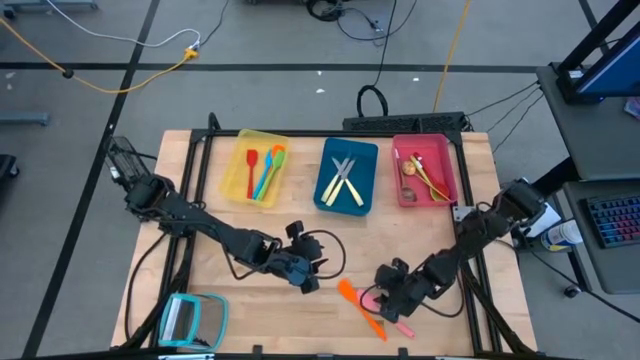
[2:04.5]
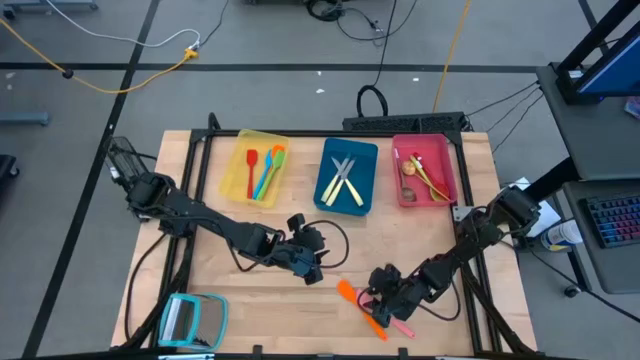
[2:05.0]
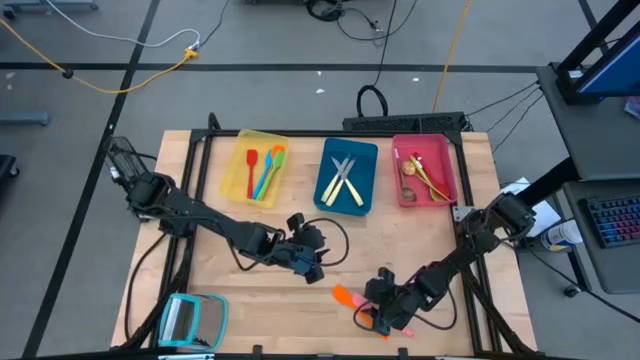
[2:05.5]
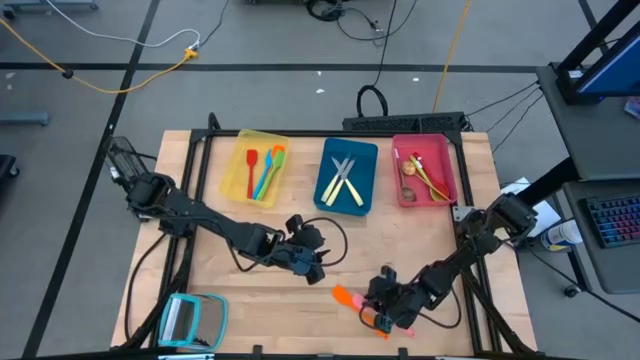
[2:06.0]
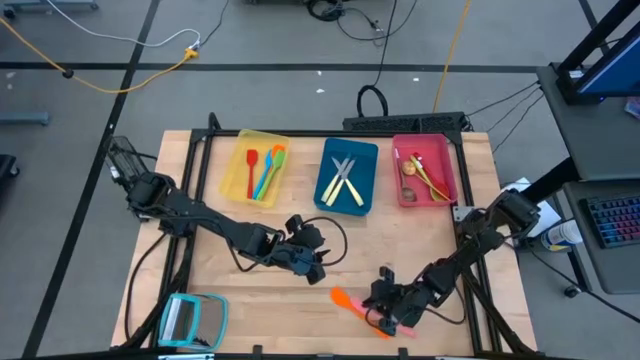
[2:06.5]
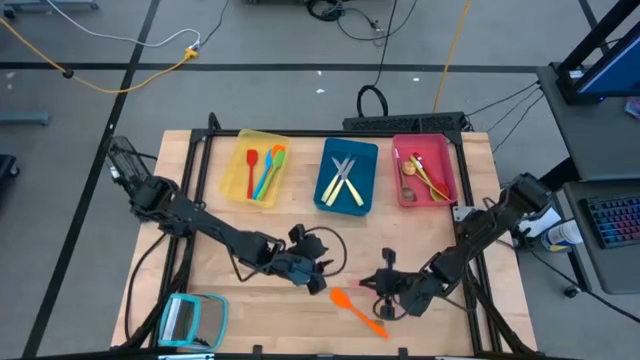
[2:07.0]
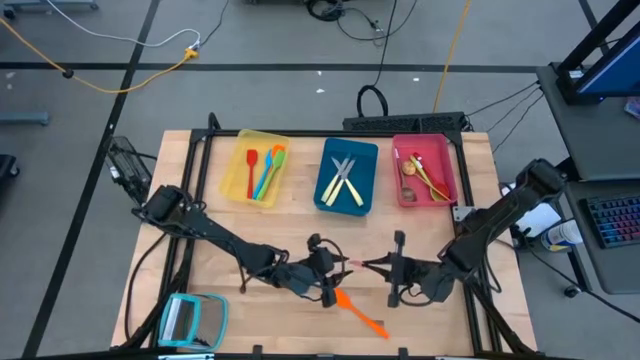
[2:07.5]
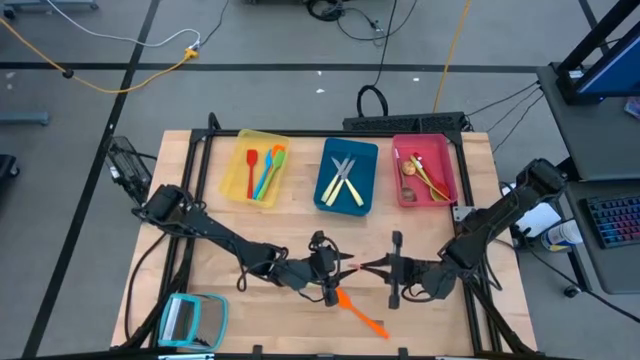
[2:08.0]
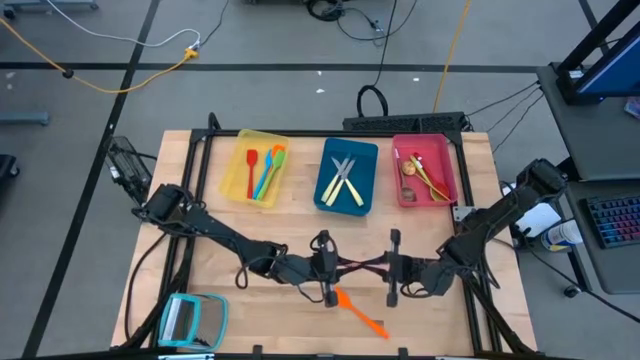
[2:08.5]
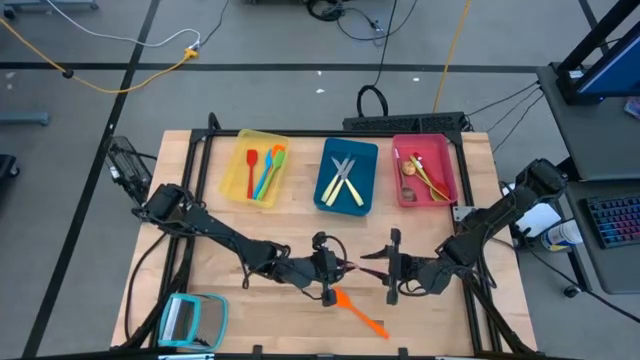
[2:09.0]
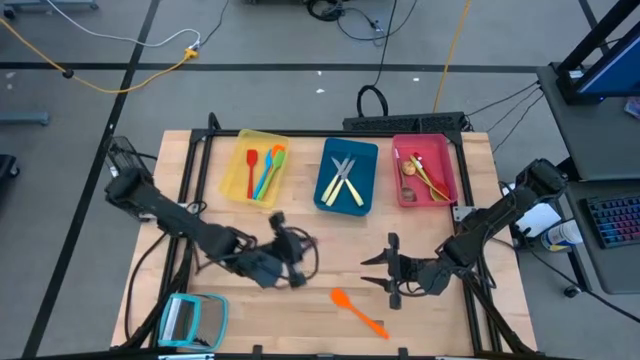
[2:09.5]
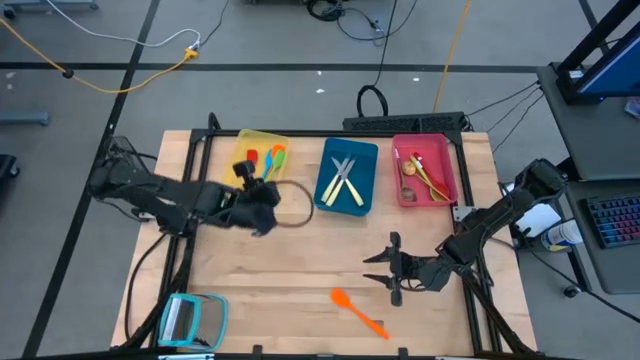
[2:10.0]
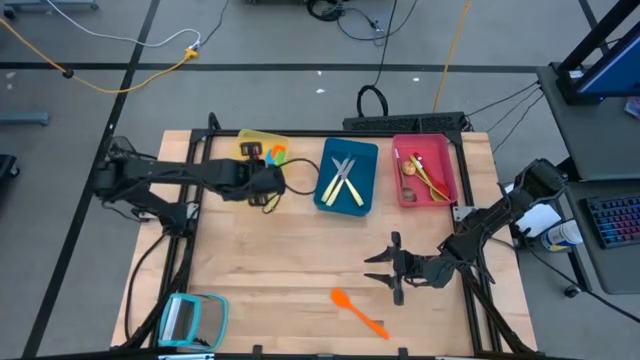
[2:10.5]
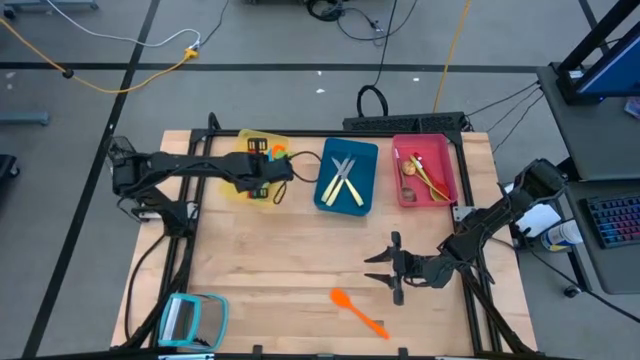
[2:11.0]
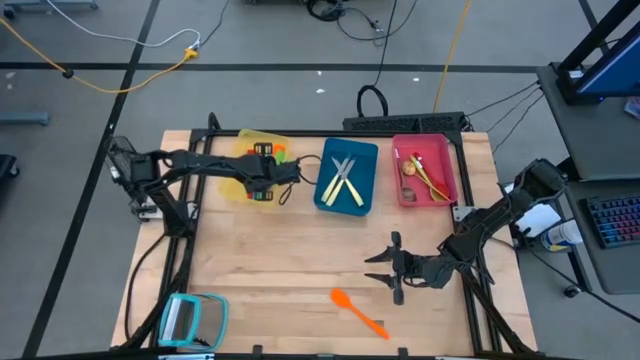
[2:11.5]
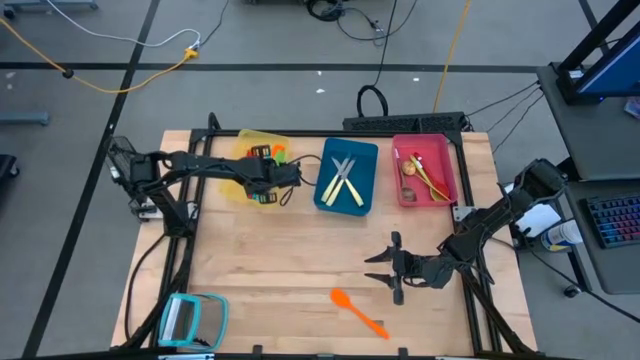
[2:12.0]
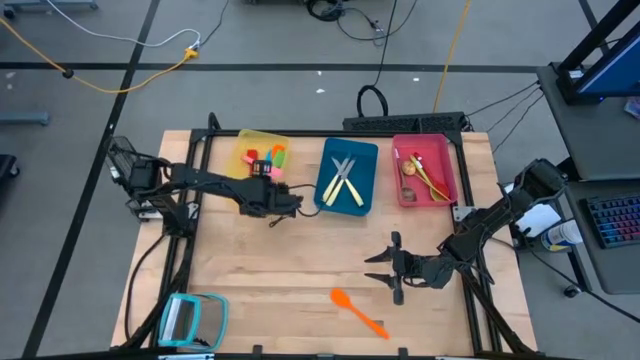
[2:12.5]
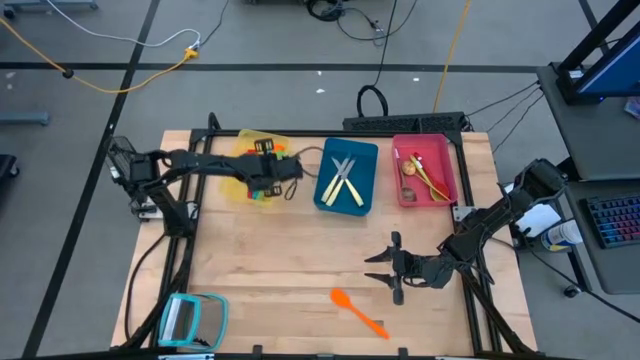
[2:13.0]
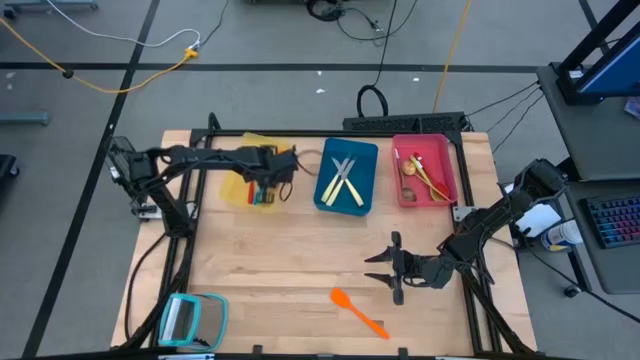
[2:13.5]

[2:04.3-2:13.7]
Task: Pick & Place Kitchen Items
Put the pink spatula into the yellow bin

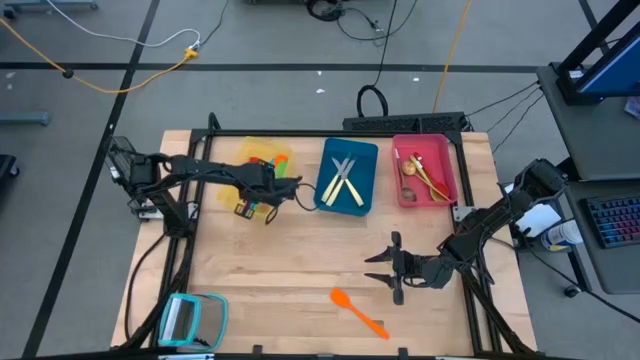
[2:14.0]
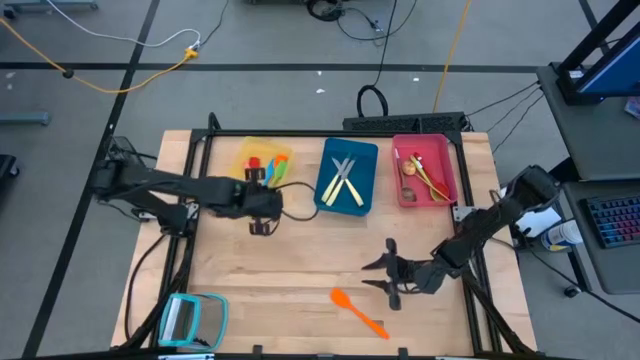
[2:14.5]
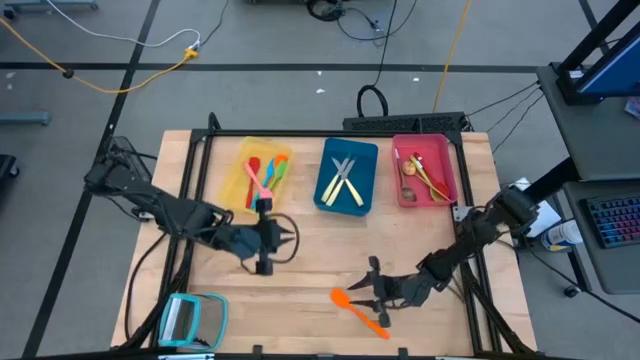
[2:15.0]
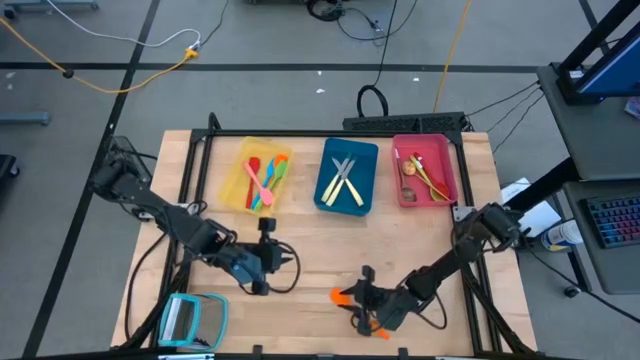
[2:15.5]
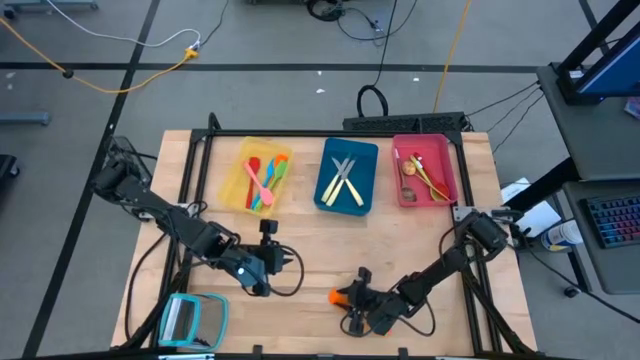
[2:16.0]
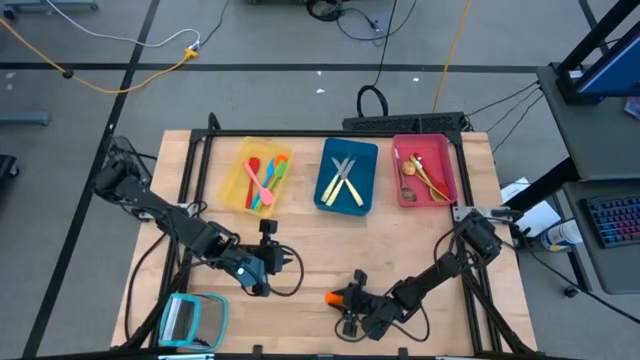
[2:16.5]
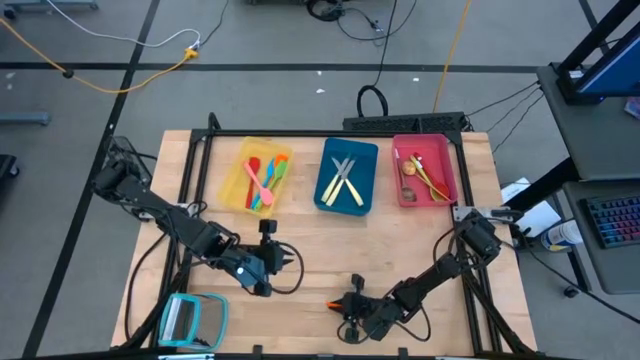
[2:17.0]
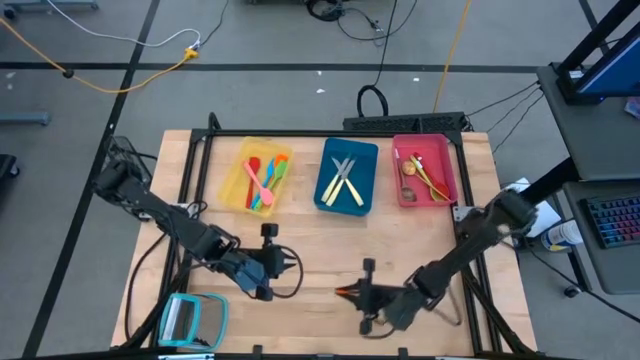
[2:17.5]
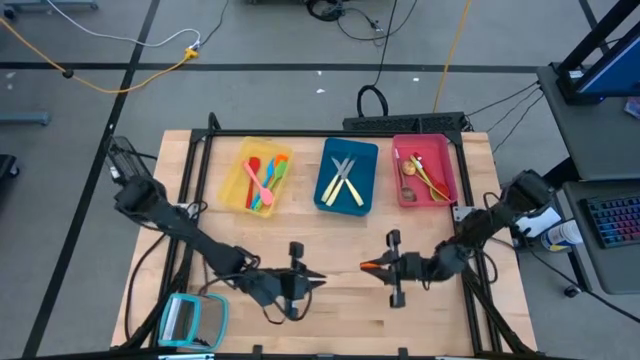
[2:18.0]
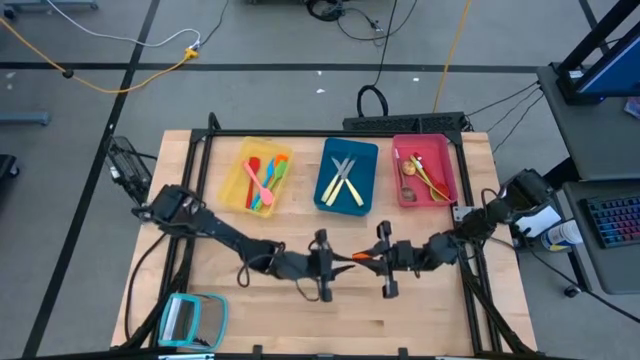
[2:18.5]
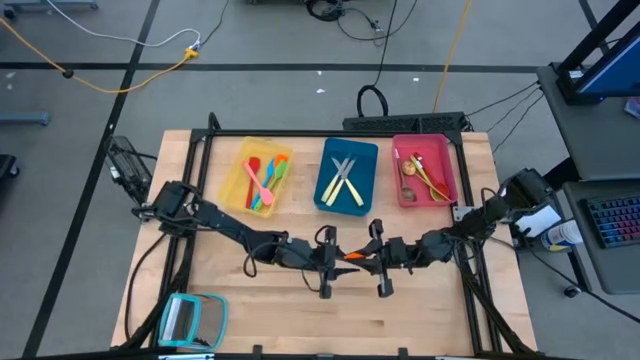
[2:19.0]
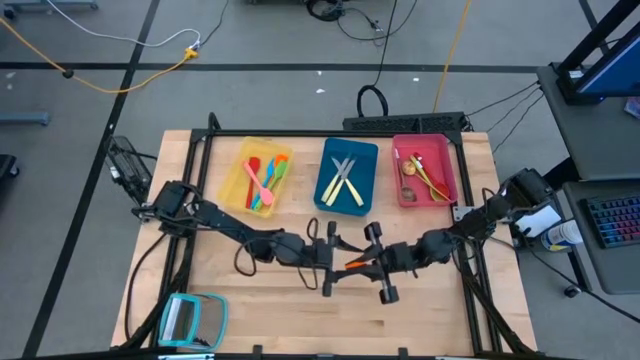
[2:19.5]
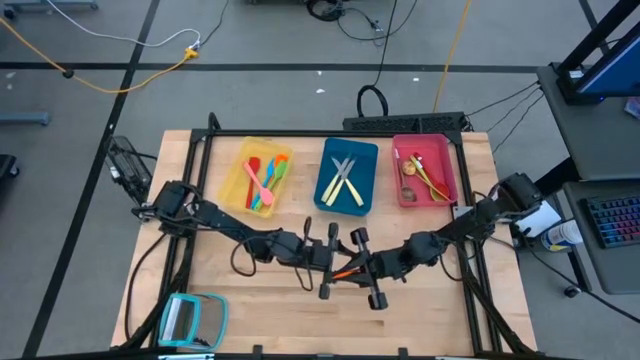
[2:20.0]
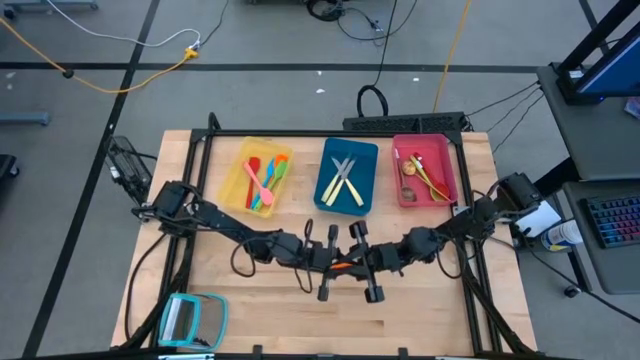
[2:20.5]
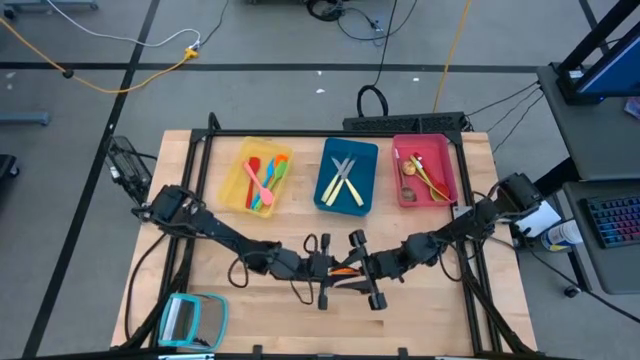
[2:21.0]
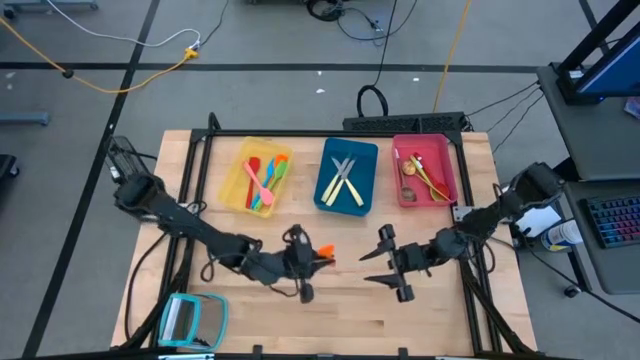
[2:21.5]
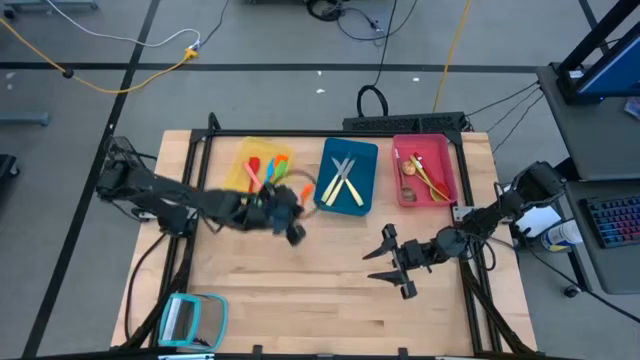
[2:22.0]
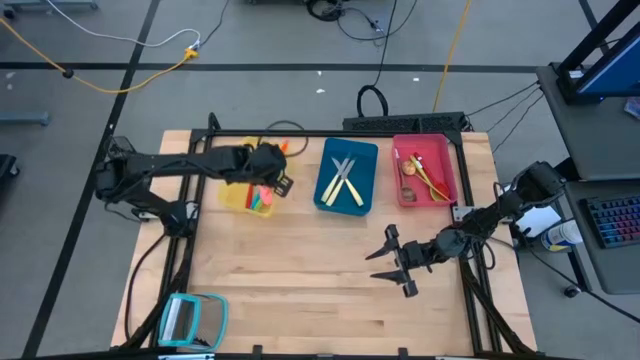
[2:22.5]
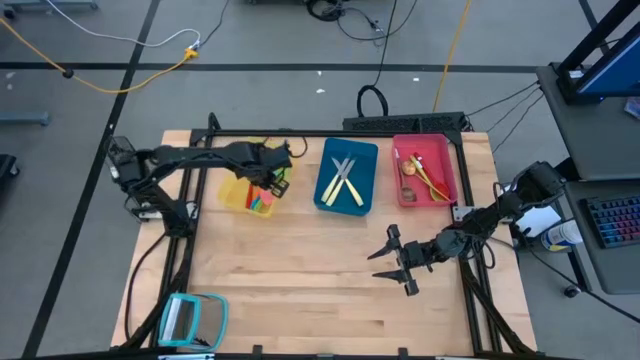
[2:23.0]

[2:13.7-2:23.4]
Put the orange spatula into the yellow bin
